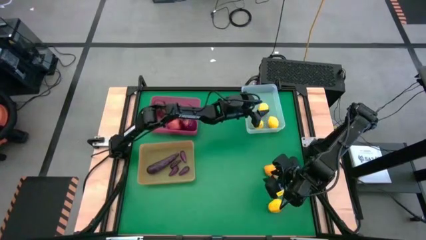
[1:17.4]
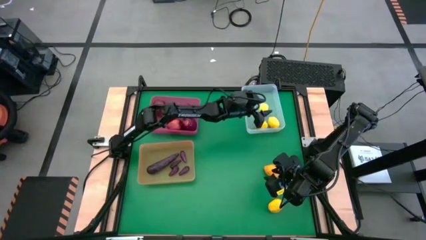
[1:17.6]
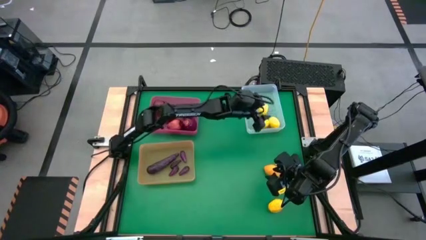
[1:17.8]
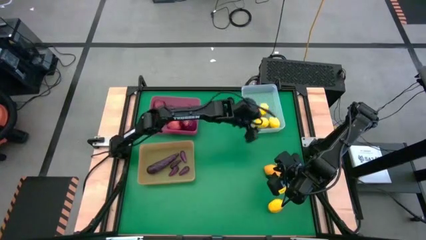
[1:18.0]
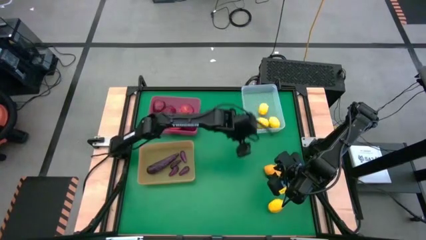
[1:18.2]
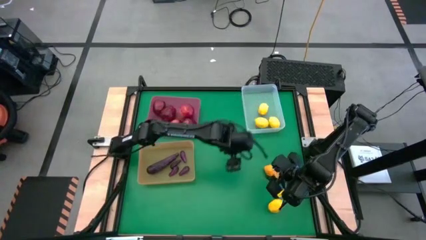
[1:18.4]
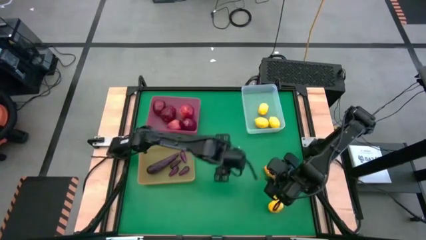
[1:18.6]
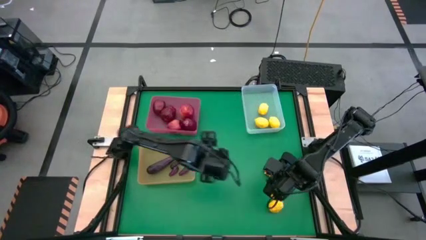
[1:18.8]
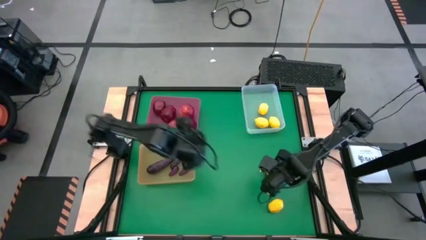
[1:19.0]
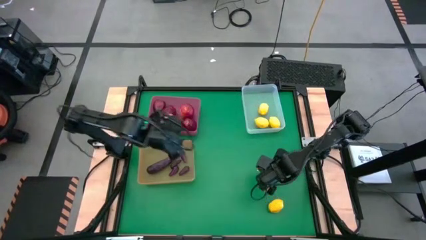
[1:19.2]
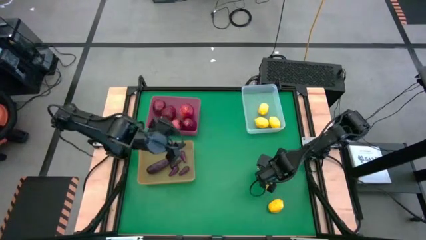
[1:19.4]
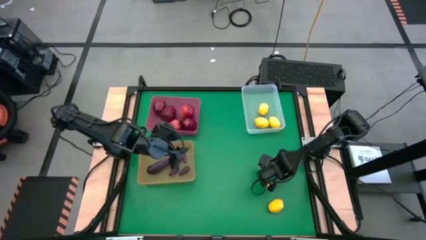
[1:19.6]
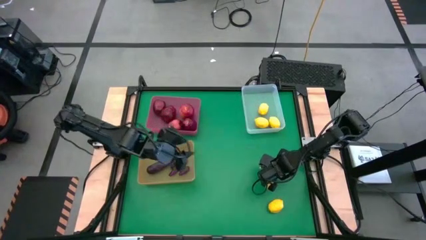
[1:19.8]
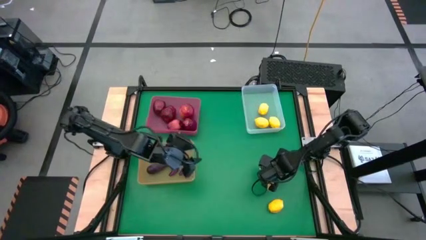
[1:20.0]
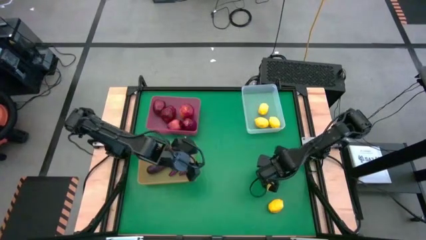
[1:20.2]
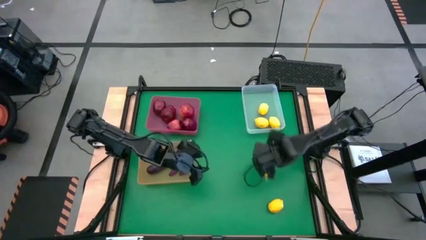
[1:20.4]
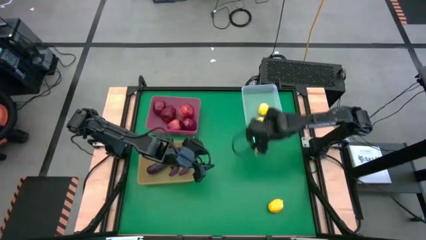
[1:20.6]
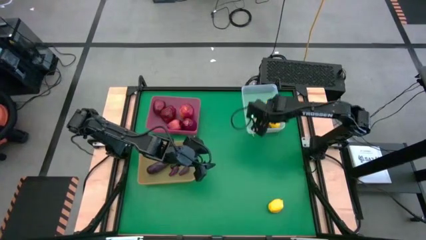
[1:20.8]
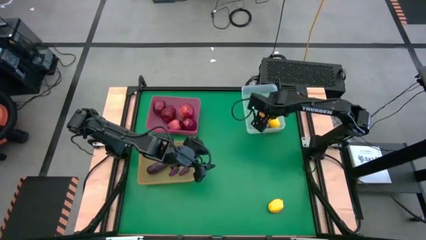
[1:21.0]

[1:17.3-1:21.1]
Task: Sort produce into baskets
Put the lemon into the transparent bin

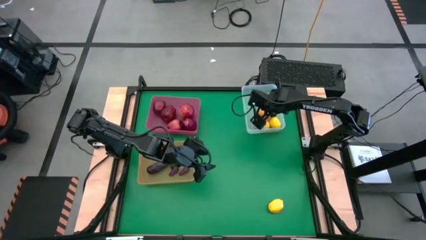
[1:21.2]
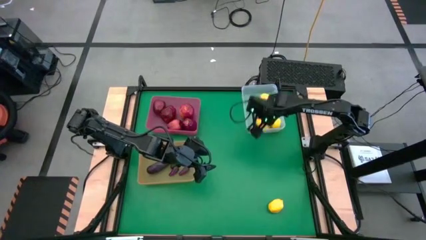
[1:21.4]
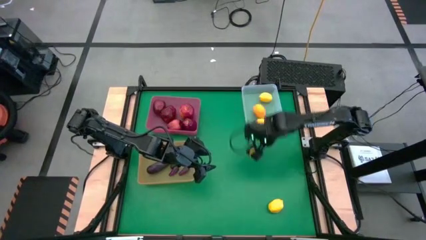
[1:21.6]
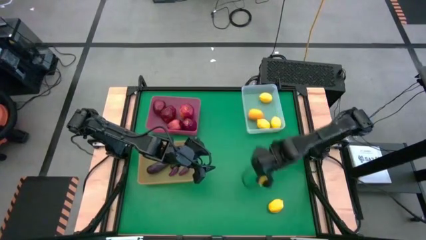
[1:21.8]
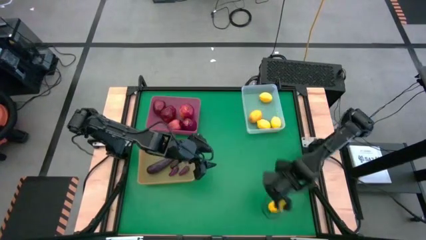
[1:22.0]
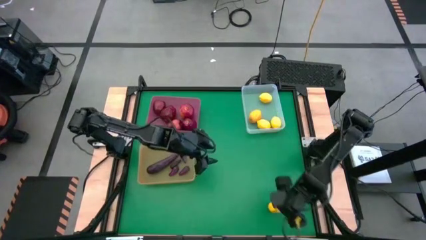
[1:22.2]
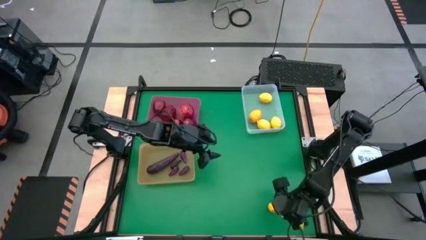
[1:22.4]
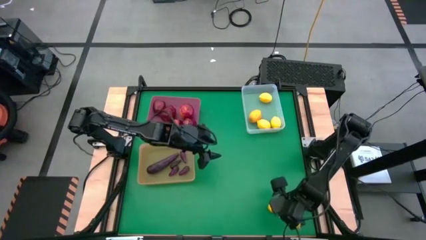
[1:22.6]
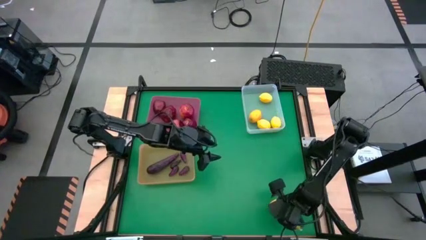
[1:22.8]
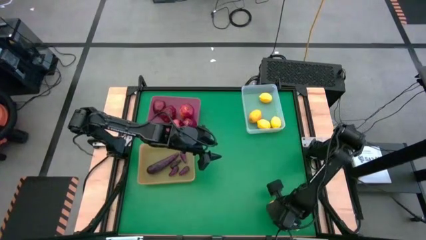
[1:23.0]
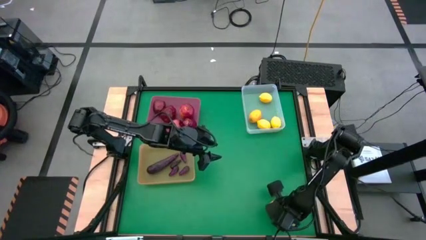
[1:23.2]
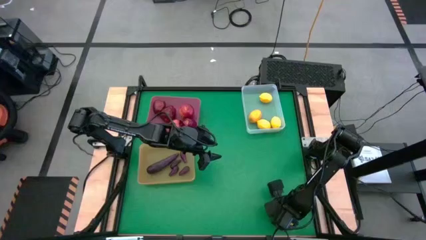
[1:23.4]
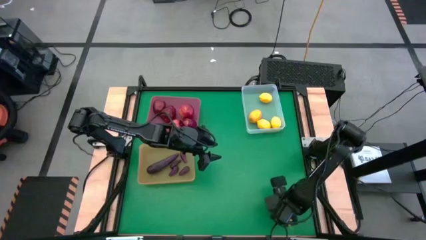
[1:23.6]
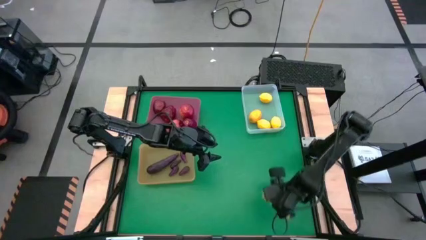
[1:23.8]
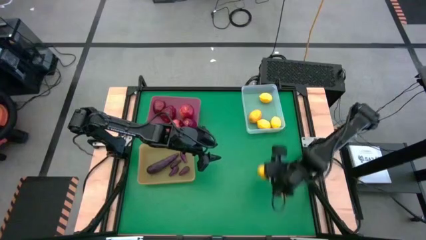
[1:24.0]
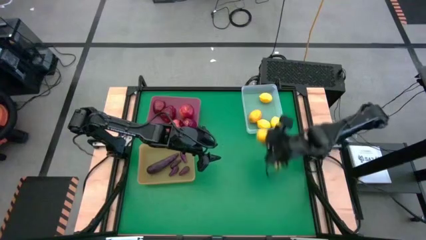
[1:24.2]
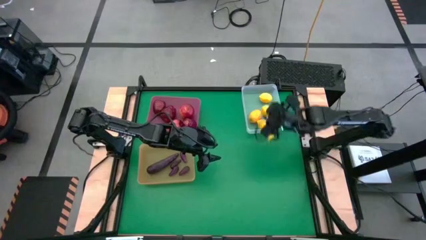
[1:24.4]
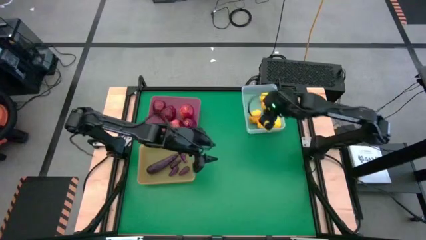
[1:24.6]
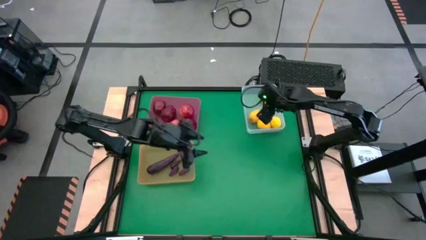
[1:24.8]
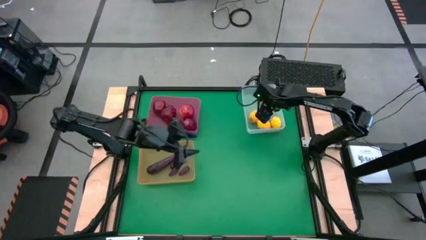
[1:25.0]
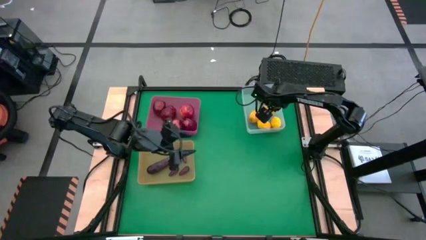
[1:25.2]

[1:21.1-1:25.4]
Put the lemon into the transparent bin

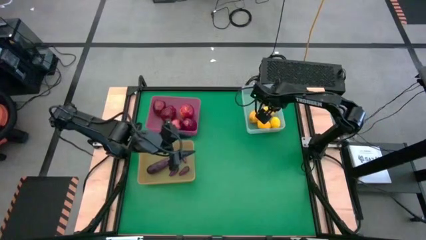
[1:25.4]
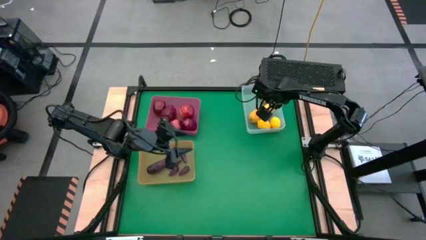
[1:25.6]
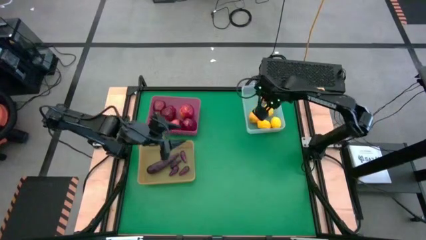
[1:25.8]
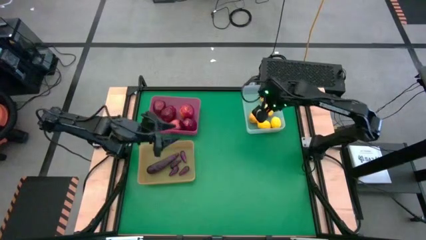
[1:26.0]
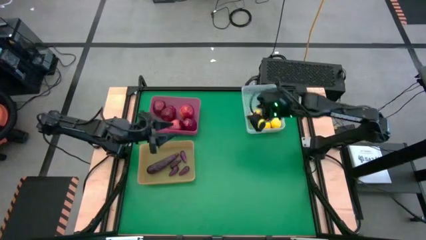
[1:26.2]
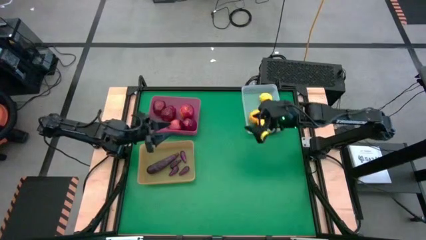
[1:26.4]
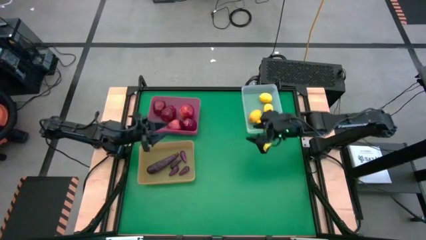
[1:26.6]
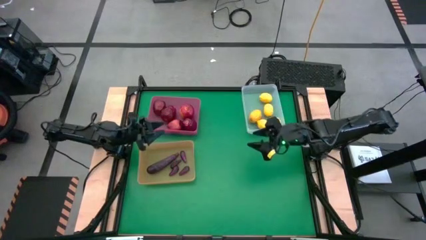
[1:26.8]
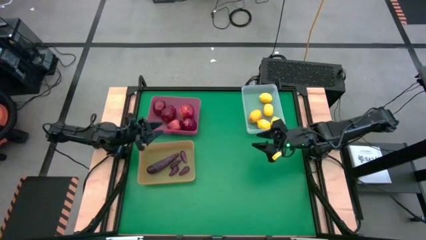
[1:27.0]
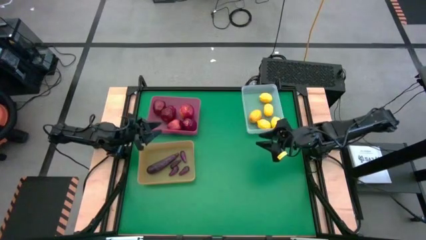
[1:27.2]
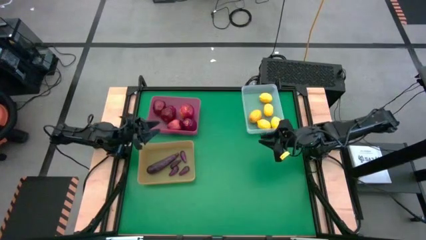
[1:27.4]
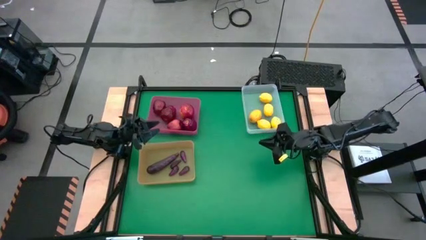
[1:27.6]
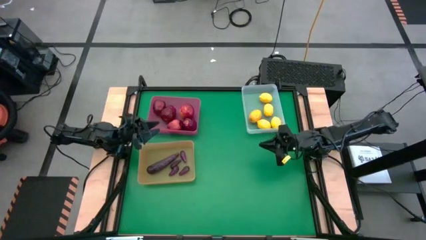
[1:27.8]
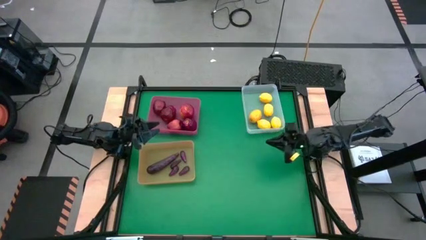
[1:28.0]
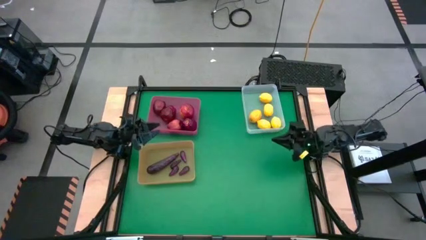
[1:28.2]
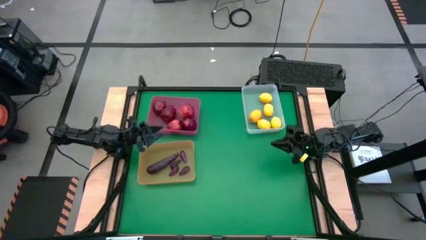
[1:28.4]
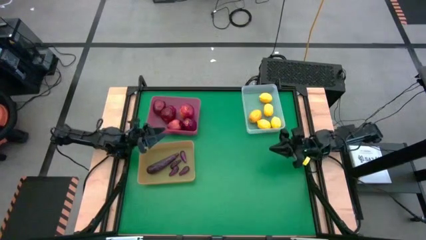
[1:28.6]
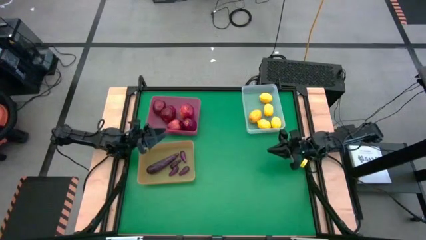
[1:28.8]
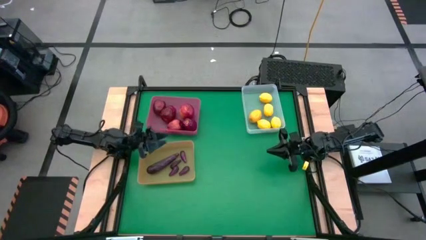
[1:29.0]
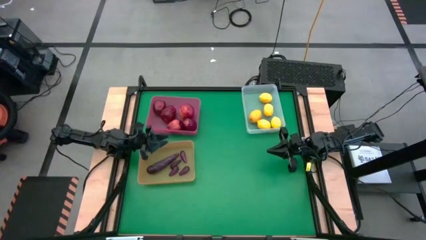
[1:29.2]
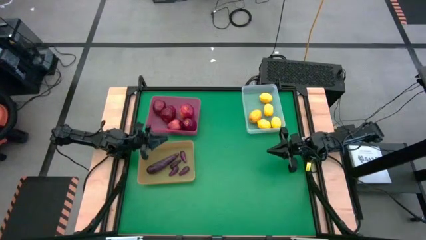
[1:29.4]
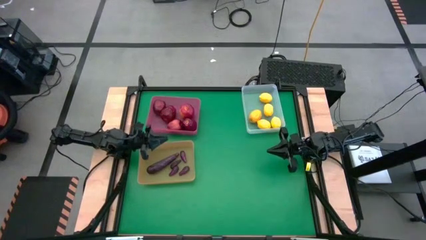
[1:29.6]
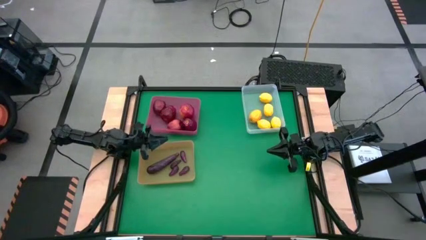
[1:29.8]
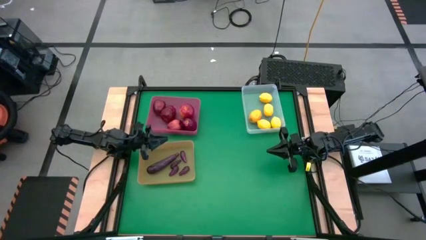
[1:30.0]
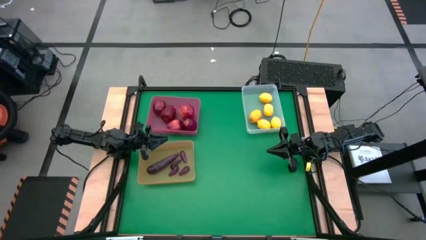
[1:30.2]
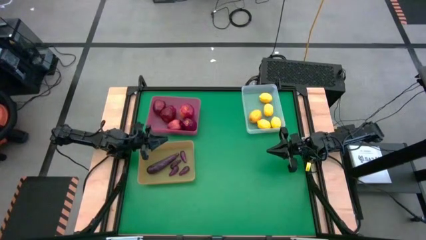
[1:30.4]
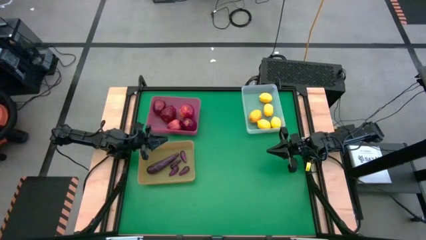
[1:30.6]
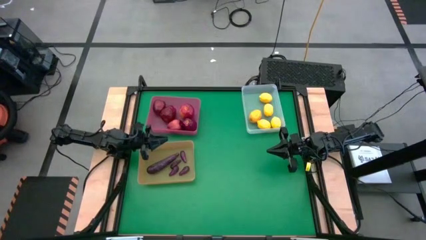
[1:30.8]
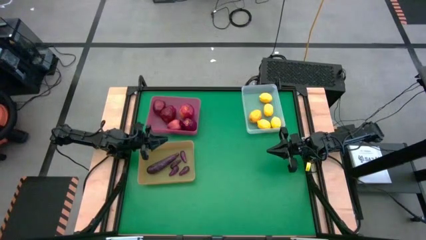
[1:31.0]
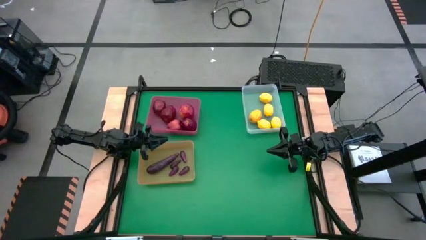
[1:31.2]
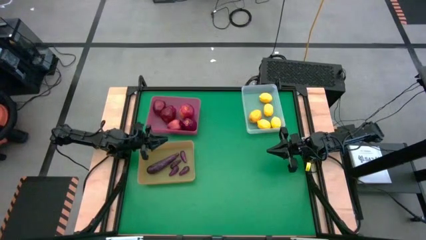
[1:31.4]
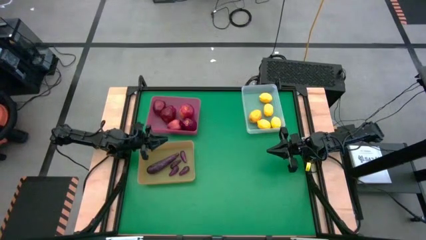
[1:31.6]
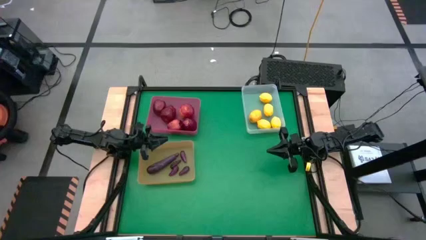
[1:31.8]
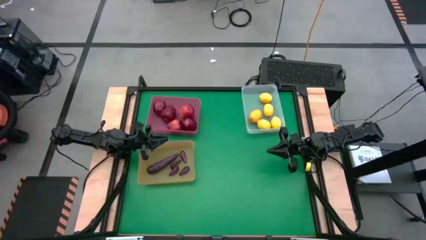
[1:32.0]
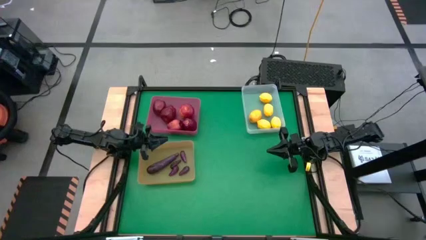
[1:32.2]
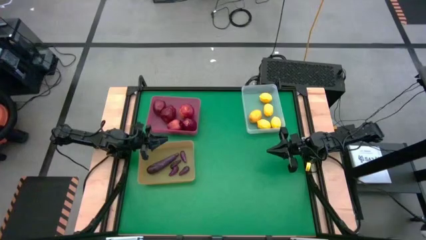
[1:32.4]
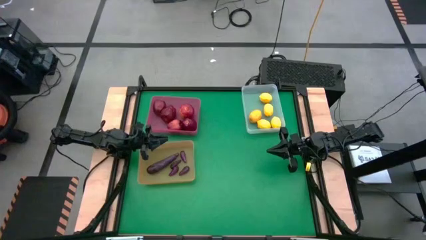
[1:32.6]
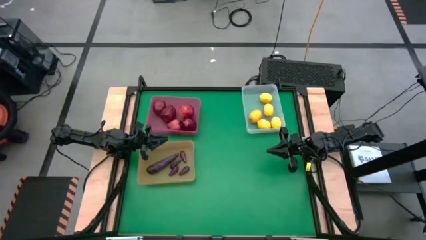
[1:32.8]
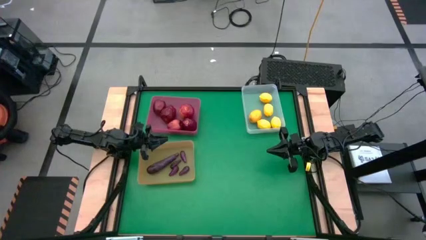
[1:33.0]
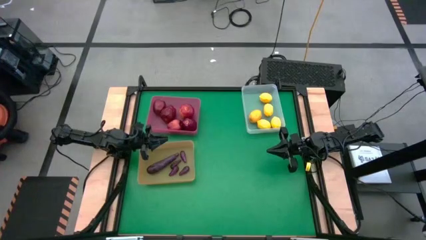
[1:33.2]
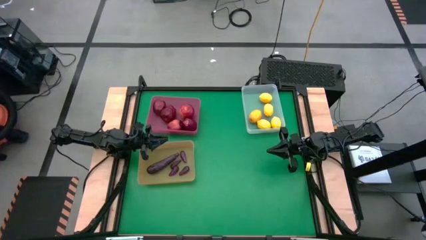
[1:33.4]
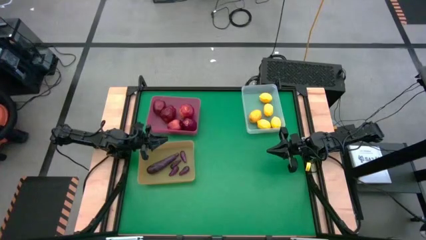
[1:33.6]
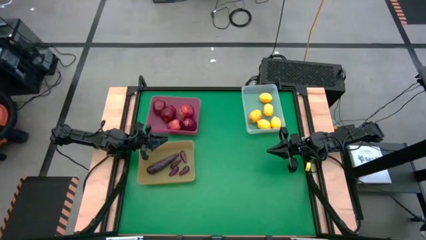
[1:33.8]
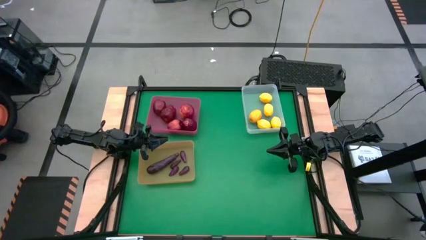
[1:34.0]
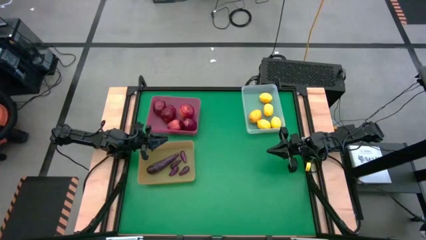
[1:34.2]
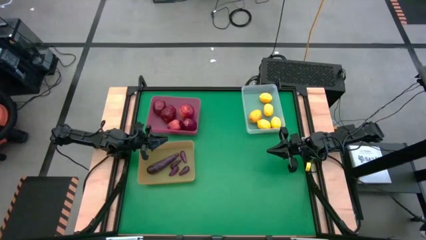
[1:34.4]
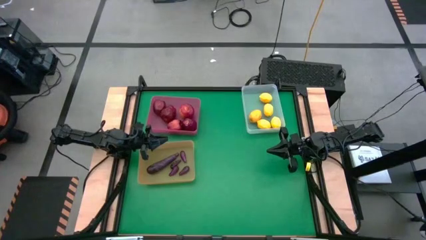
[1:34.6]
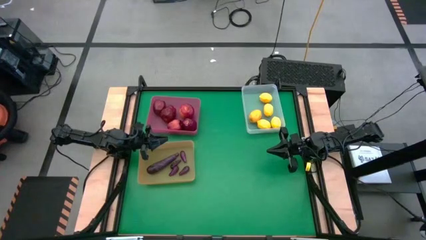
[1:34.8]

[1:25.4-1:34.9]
Return to Home Position
